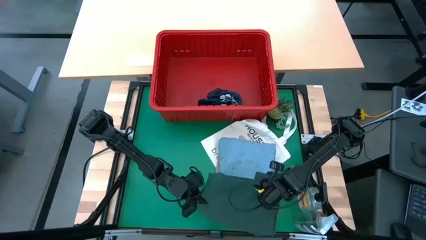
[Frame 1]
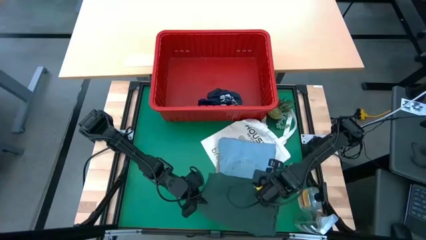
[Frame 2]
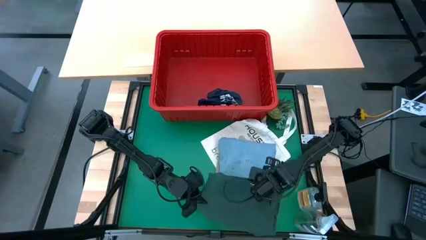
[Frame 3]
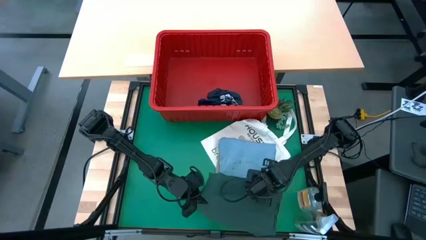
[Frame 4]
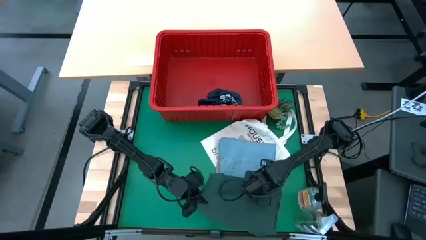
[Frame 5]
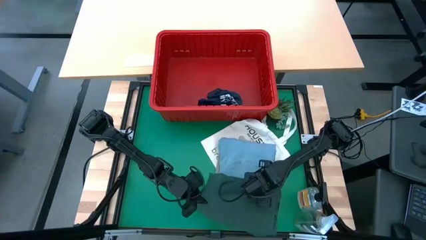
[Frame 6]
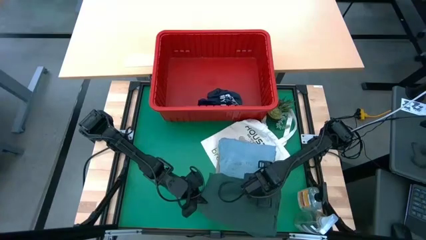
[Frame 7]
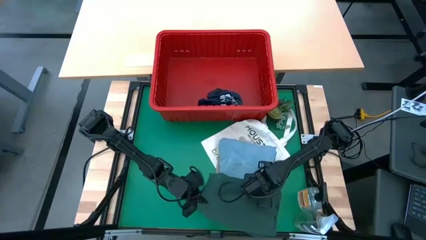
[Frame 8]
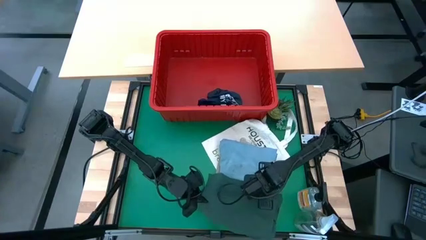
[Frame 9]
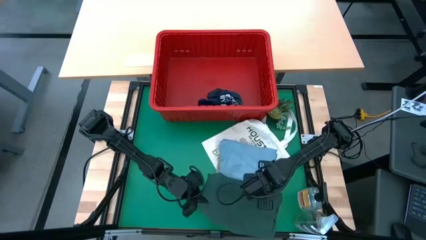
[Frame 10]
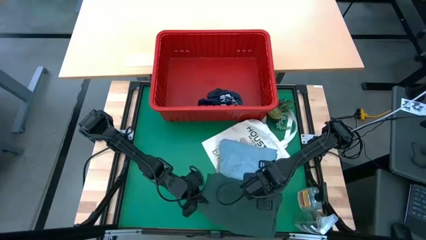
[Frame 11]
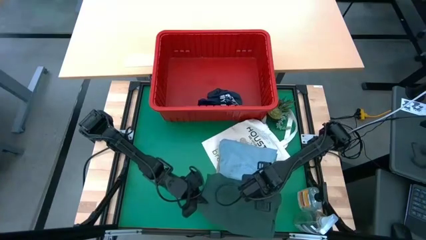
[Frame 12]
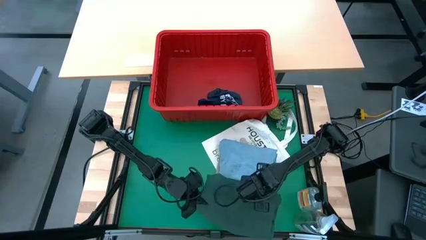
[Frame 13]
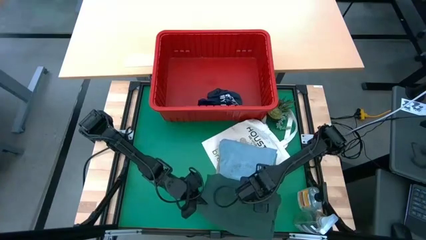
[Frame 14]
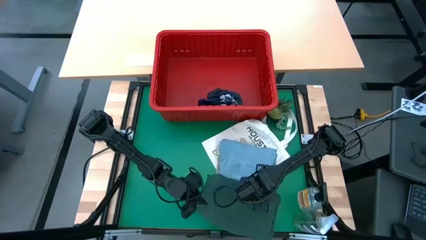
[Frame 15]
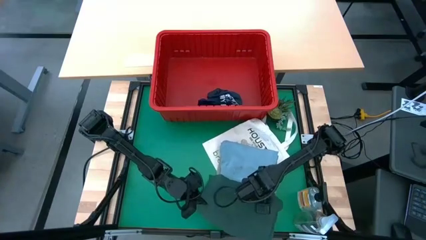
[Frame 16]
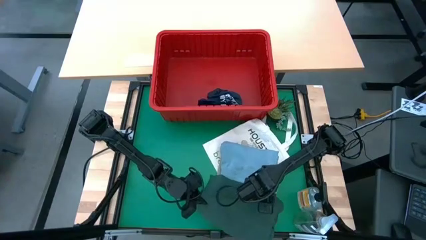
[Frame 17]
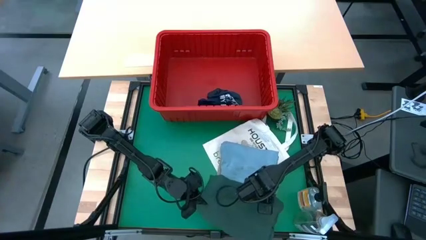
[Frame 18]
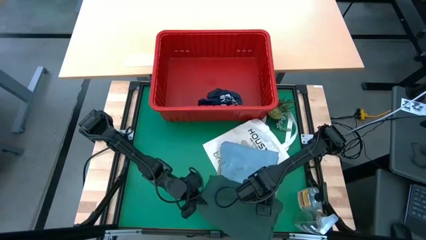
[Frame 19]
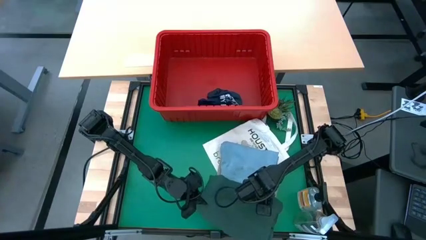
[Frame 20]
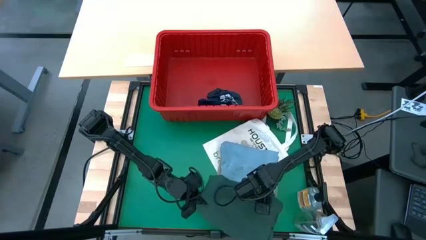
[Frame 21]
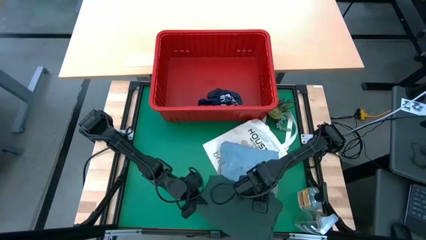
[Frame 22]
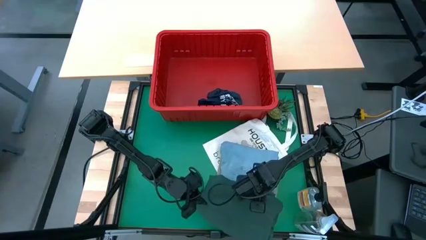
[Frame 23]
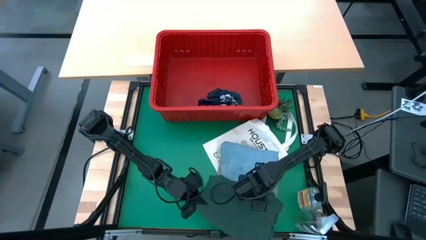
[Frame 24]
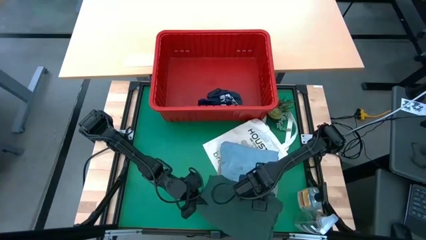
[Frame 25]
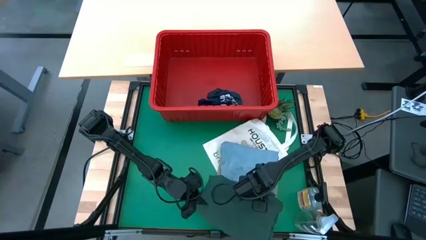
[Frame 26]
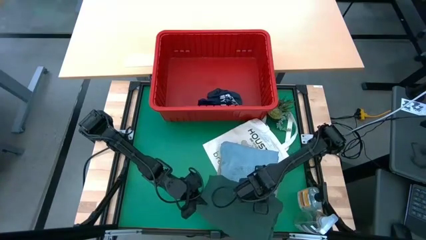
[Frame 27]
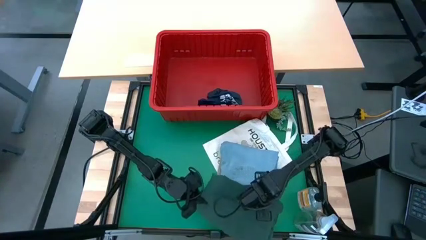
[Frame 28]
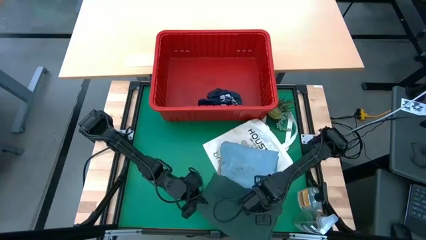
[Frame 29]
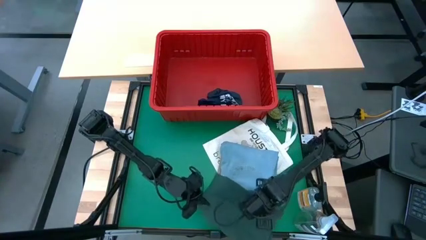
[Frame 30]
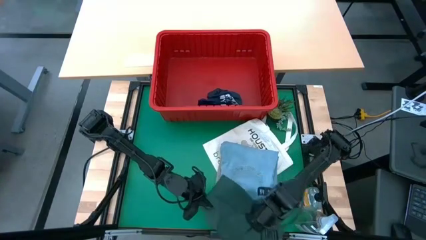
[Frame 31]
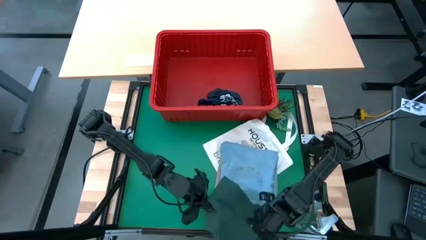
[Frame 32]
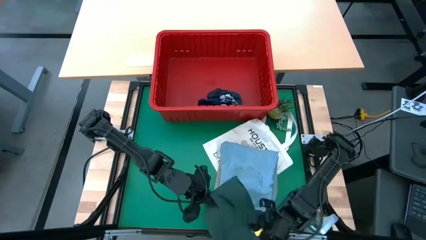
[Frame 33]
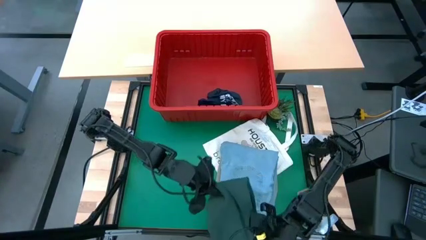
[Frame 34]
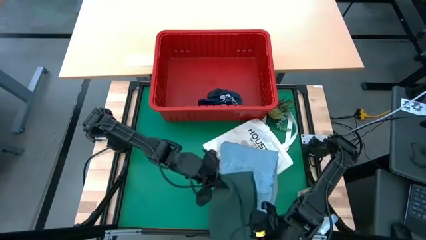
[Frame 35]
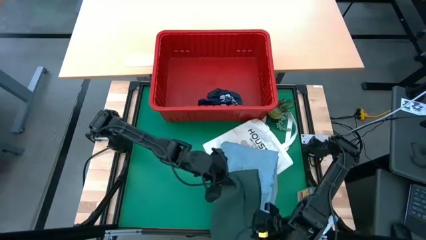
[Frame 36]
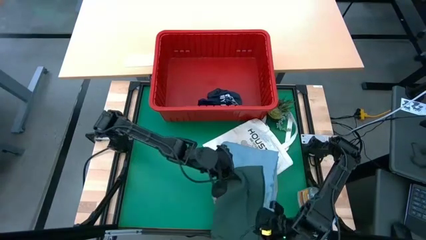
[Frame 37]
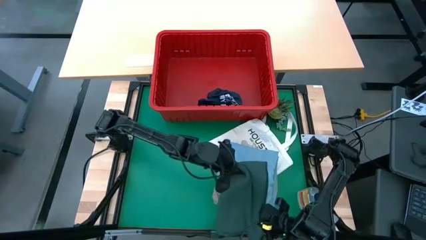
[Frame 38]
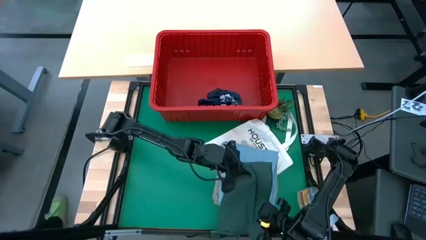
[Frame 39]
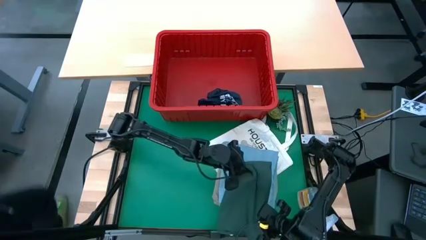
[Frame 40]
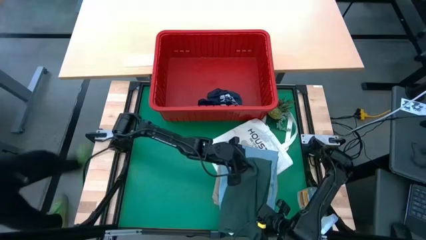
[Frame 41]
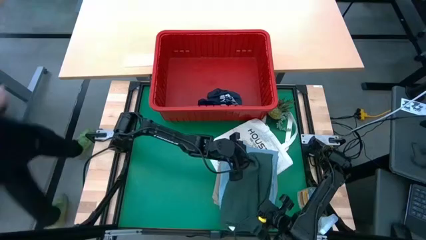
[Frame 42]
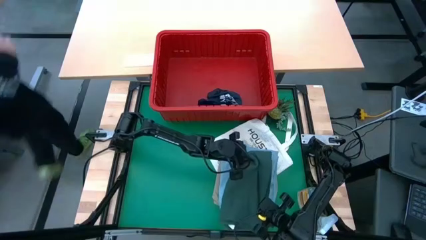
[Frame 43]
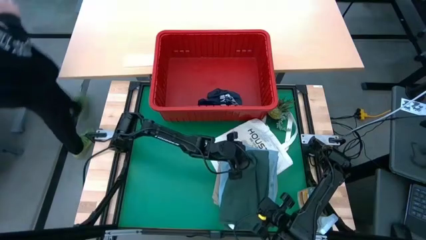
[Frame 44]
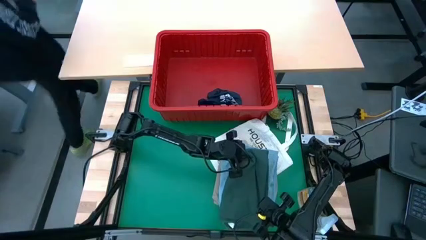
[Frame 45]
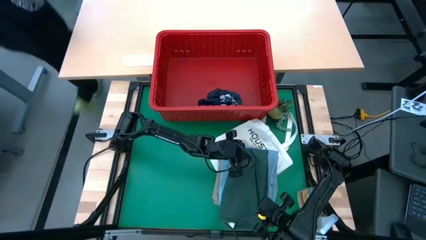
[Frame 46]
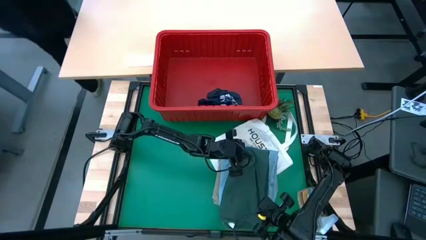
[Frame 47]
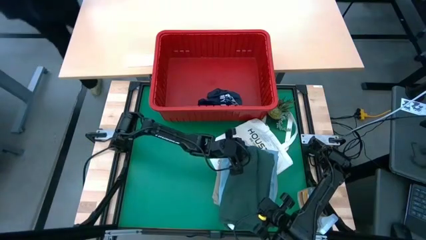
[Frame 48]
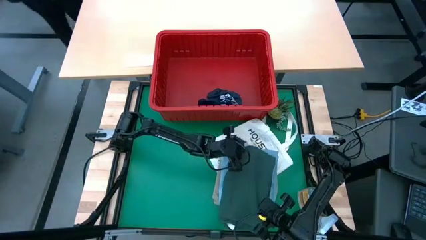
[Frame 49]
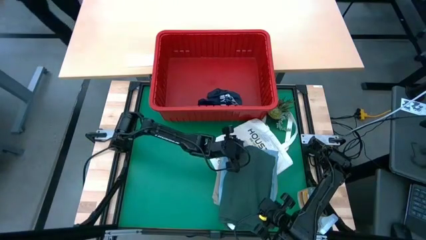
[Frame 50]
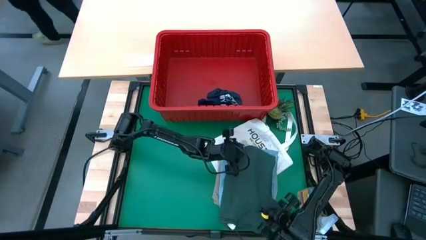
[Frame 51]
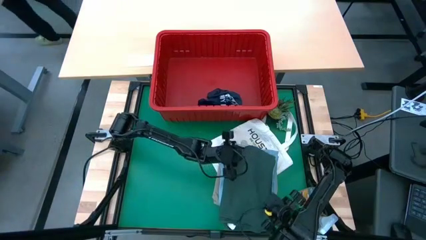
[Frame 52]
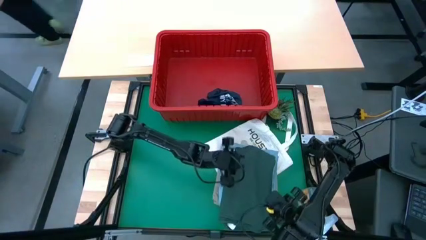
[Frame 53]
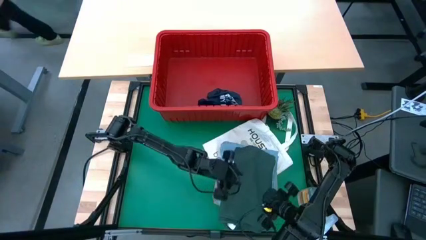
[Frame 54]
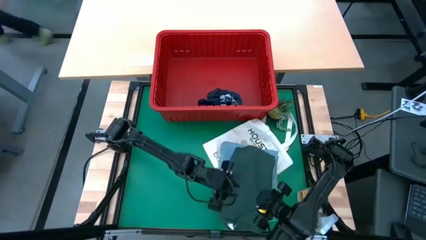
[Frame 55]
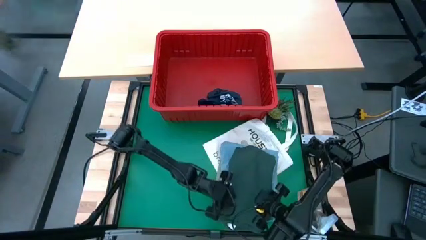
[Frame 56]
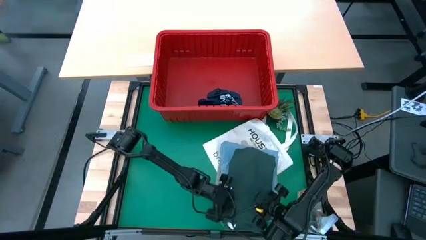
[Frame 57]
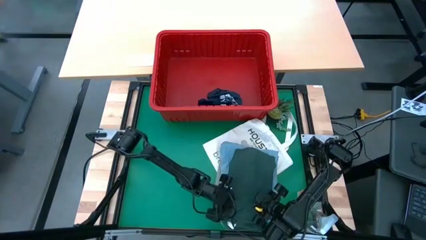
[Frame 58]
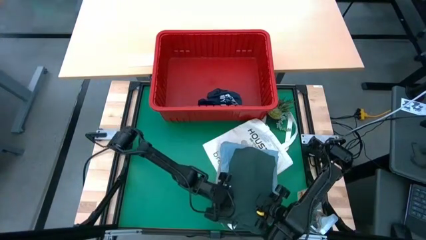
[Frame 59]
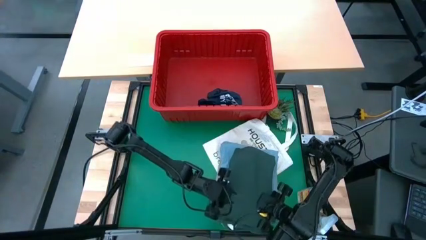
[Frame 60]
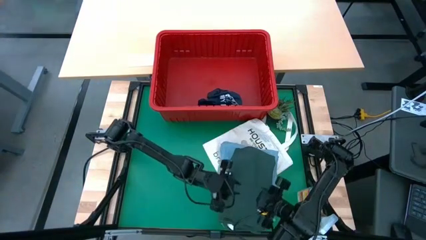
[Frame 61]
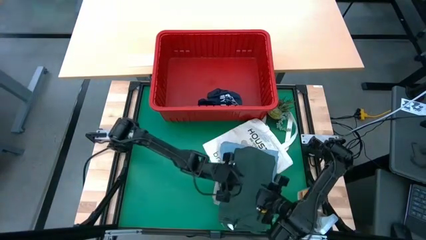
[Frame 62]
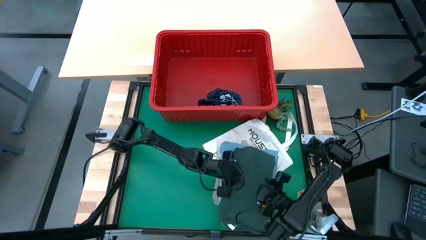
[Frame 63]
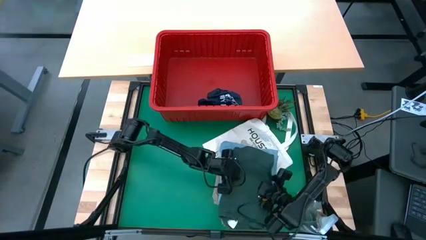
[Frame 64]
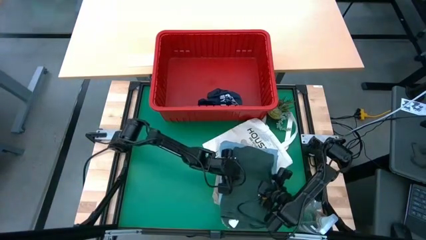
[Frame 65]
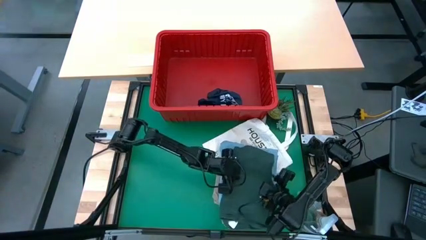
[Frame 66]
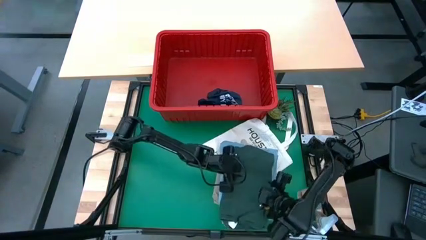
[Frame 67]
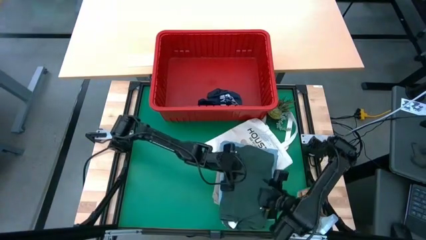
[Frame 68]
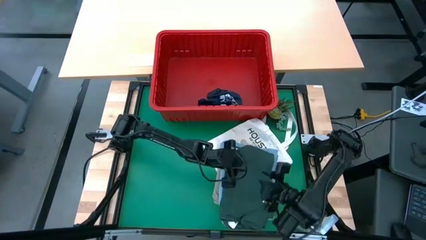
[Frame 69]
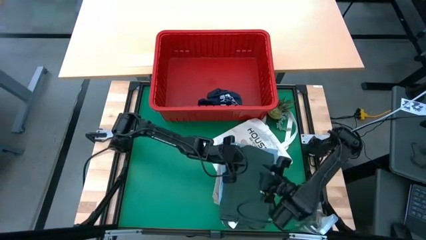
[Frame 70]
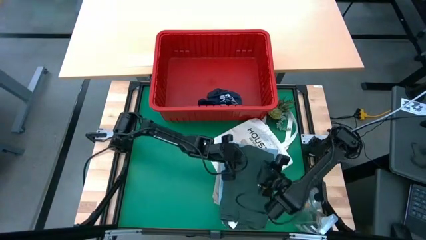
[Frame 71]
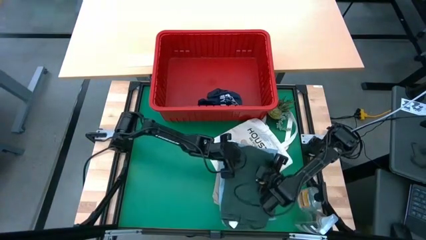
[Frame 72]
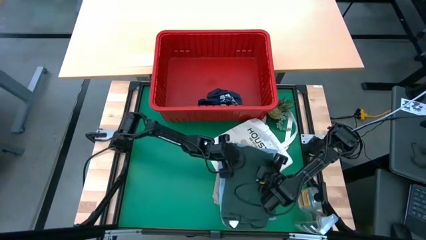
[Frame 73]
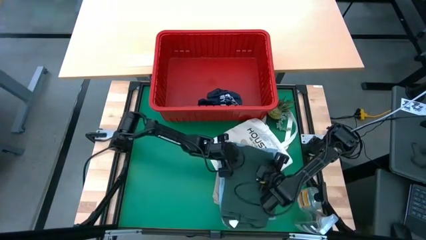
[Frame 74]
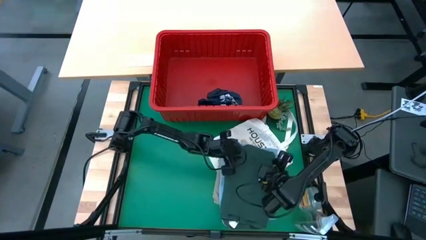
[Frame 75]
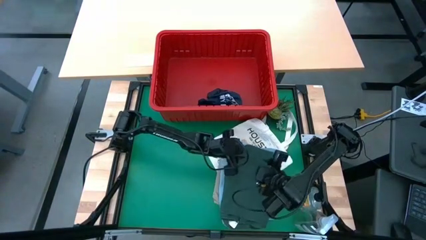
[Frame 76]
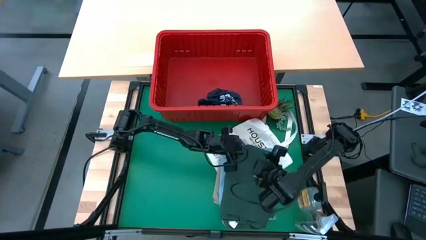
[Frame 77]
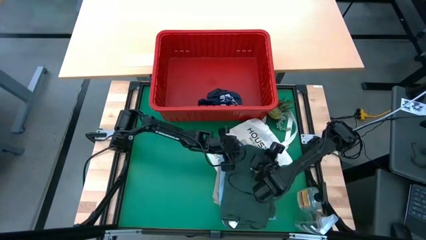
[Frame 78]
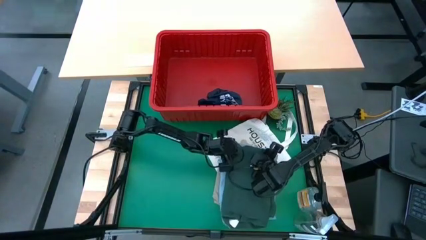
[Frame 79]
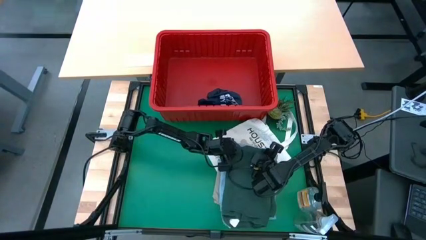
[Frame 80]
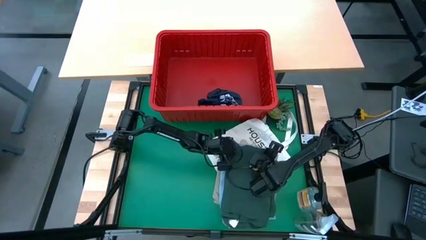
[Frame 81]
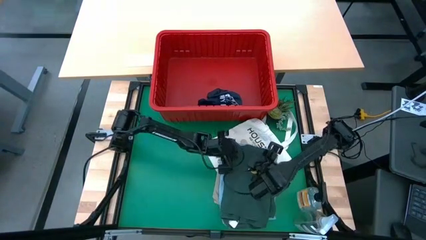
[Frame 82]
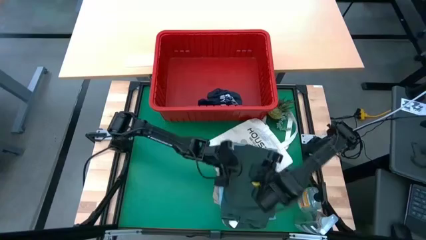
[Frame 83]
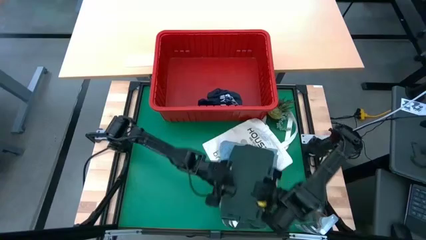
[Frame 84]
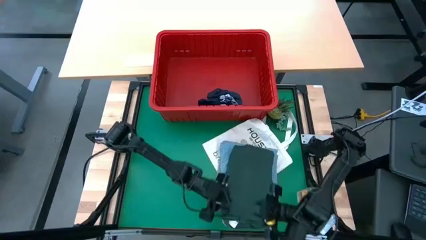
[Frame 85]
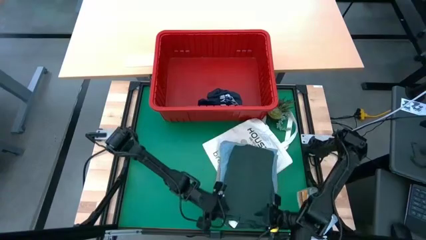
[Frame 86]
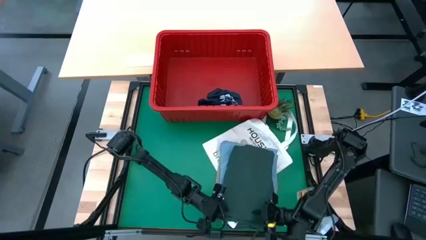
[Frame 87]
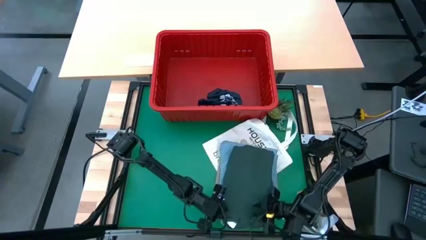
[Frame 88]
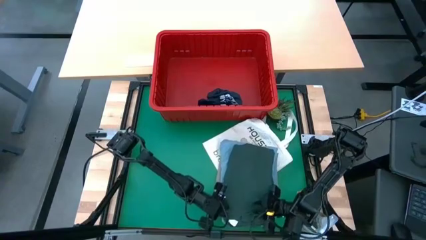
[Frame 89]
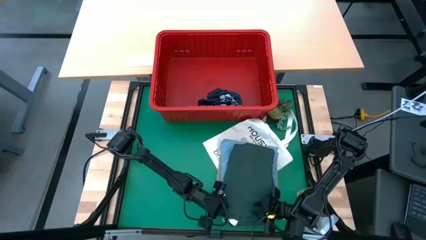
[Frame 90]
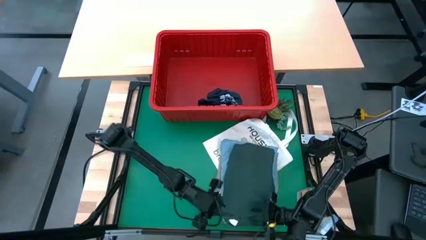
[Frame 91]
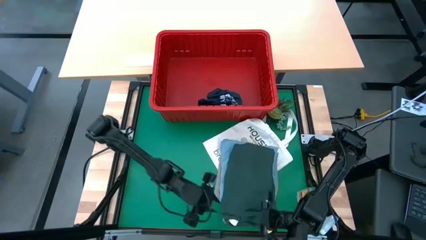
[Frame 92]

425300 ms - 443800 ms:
Task: Fold Laundry from Bin
Stack the green polo shirt on top of the light blue jeans
